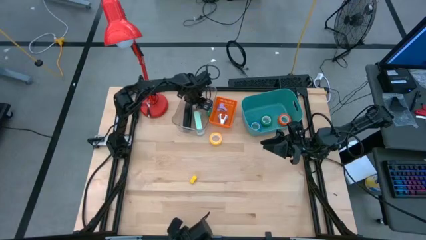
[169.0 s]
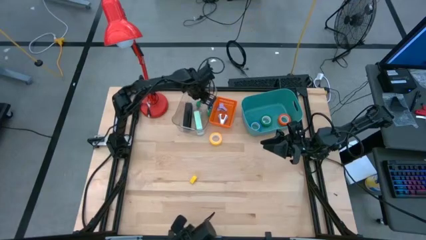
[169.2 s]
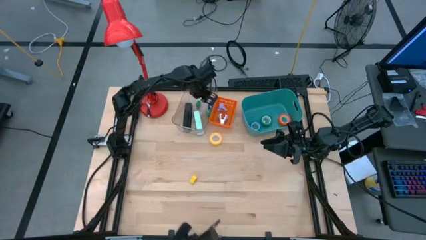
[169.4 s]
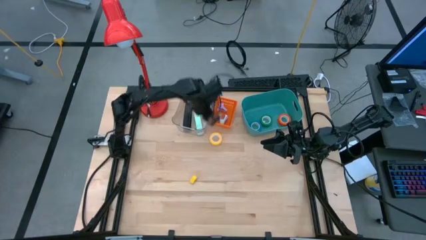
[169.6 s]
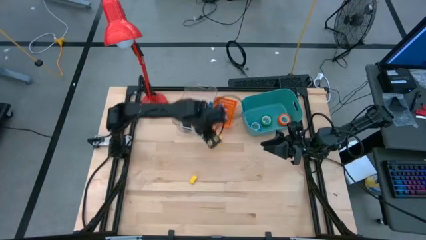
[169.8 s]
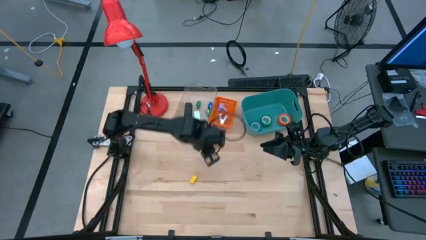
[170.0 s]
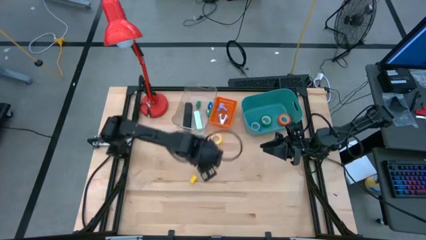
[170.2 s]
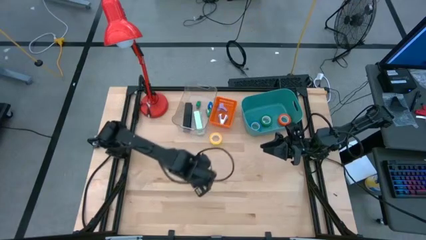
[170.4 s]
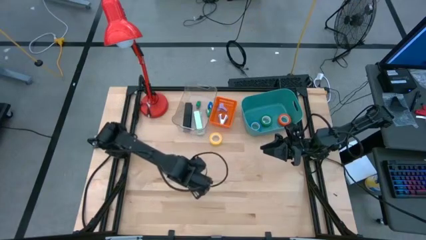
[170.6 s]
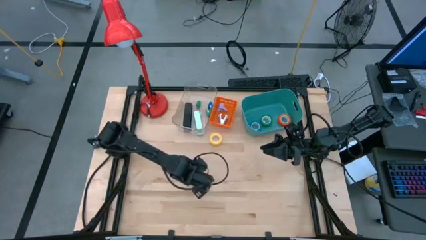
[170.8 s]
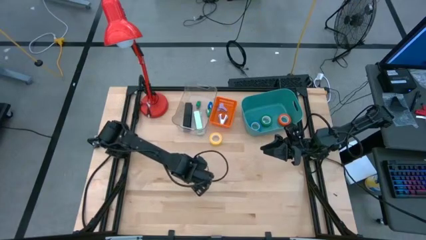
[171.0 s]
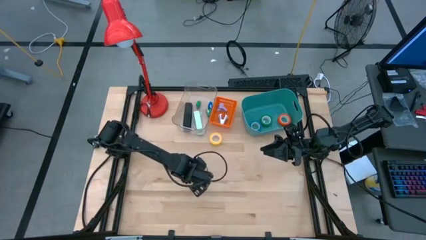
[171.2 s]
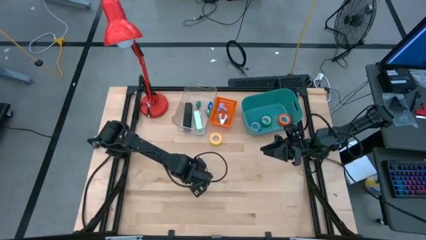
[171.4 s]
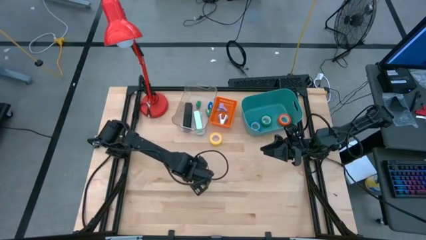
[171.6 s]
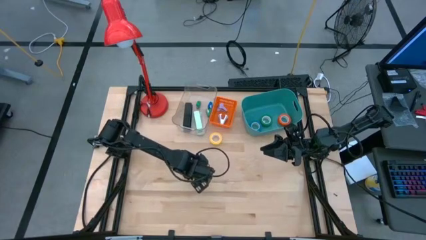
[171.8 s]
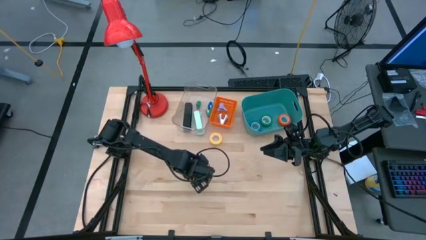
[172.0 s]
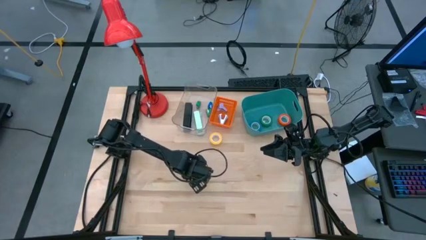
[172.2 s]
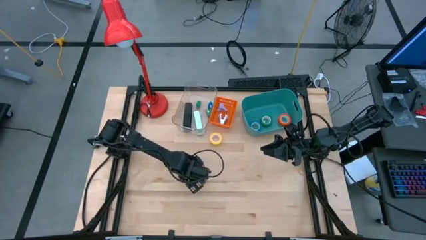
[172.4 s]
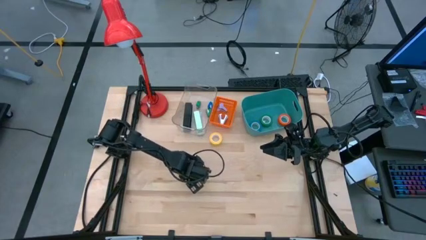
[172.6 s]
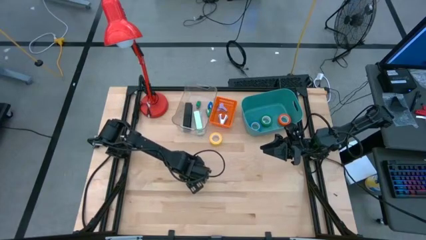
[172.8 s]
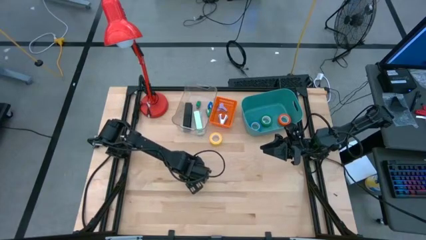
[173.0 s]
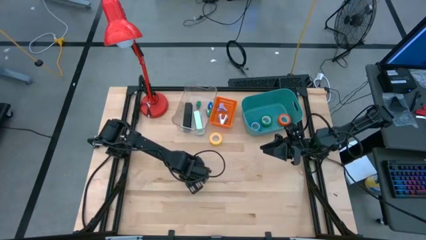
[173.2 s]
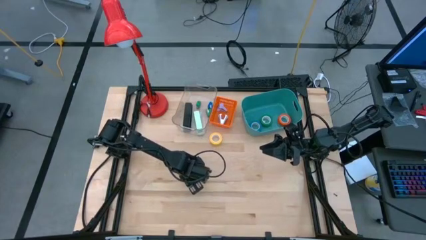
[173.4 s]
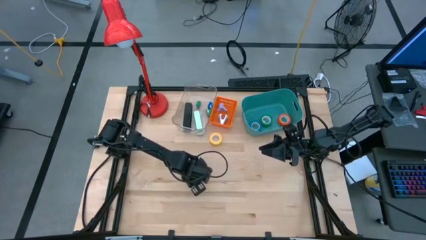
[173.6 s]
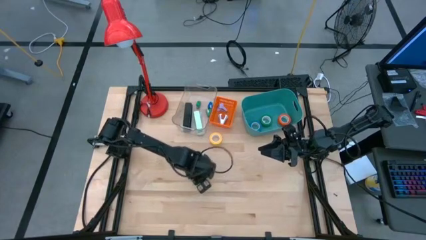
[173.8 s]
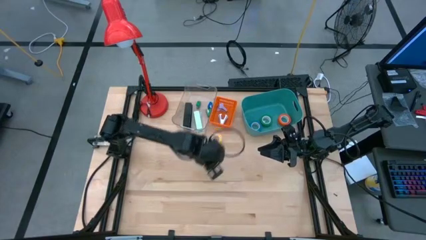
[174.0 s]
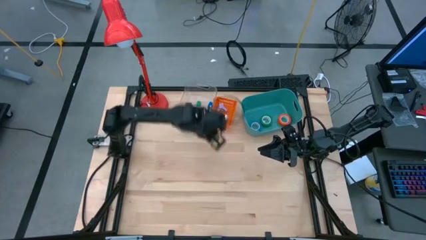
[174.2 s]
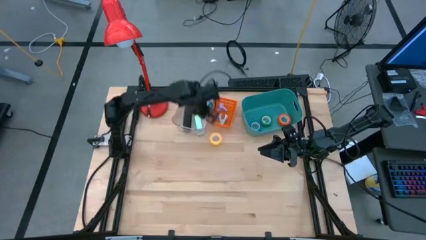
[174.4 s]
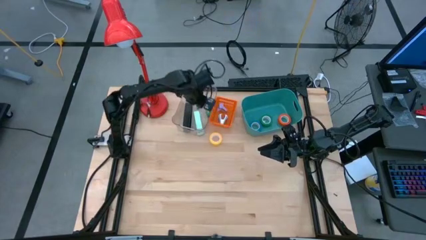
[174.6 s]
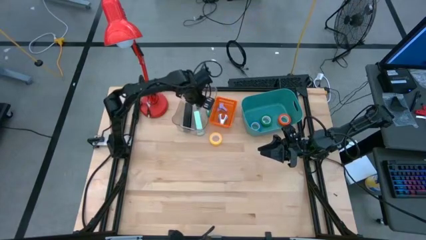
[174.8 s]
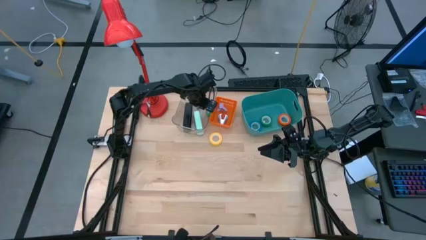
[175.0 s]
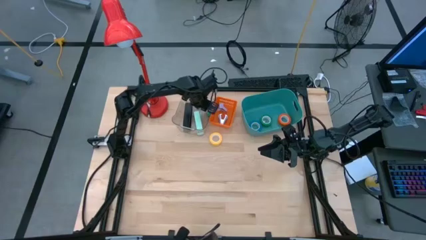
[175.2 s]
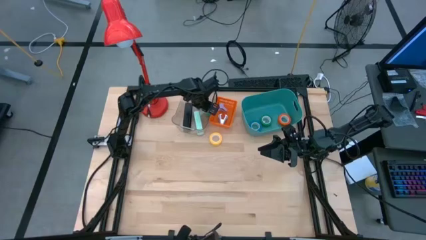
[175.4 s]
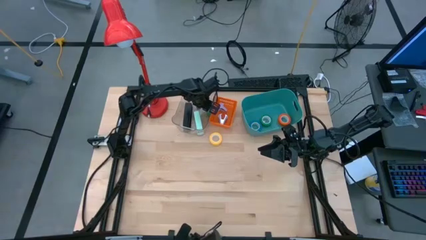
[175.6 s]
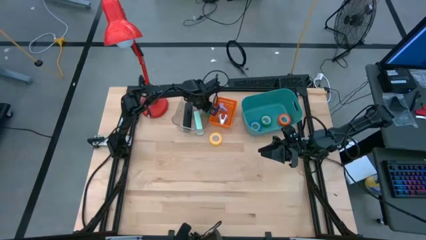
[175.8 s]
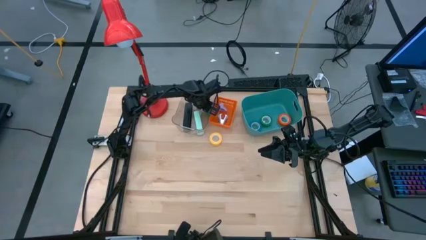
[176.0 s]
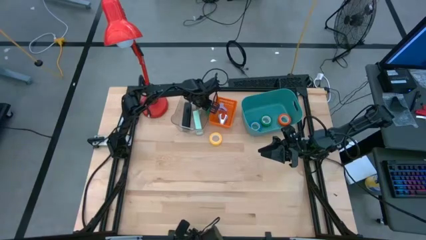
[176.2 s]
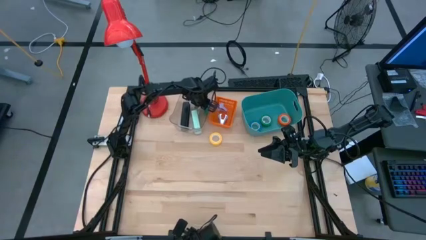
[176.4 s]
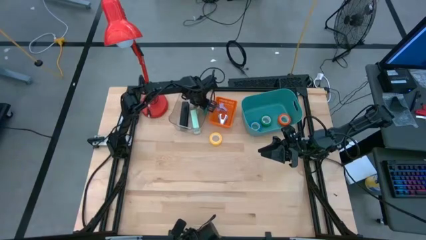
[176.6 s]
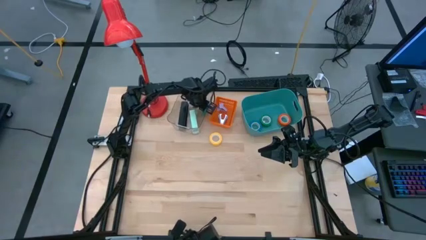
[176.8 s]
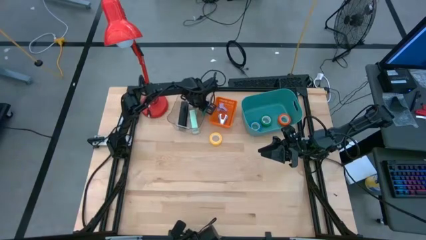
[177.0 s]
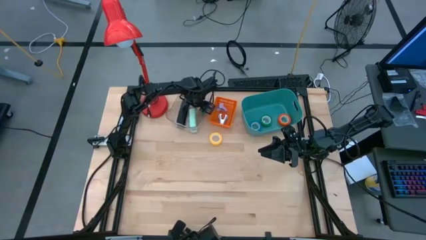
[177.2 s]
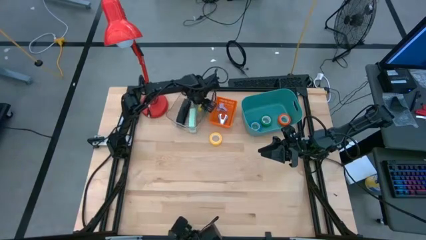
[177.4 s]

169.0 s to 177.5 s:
Task: Pick and place Stapler, Stapler remover, tape
Put the yellow stapler into the transparent bin

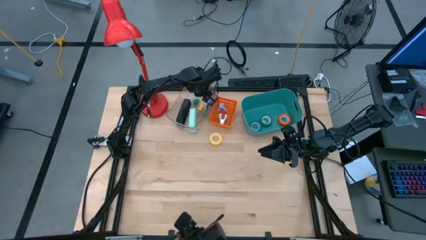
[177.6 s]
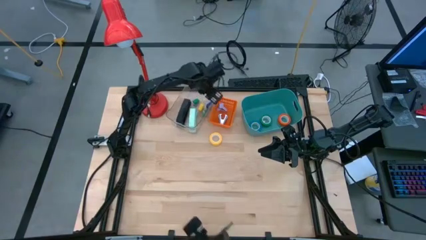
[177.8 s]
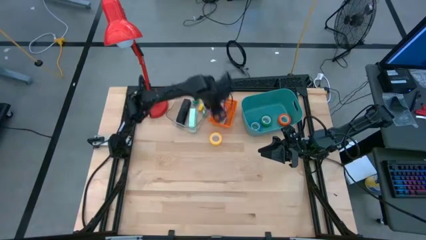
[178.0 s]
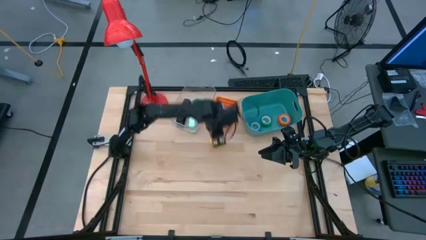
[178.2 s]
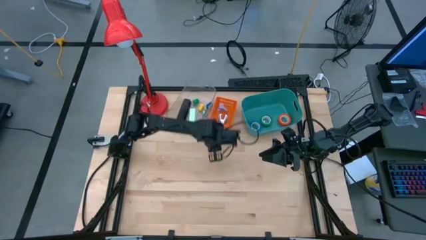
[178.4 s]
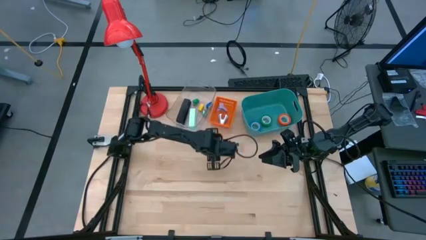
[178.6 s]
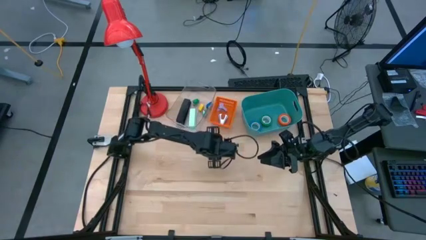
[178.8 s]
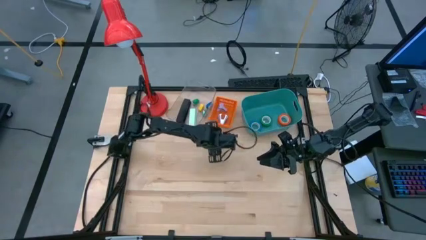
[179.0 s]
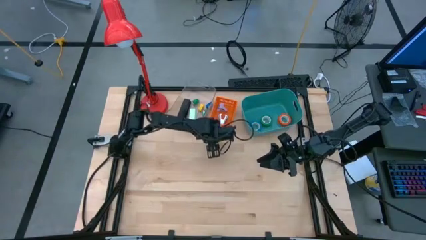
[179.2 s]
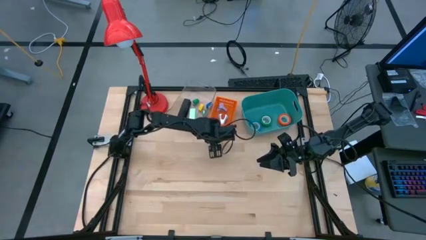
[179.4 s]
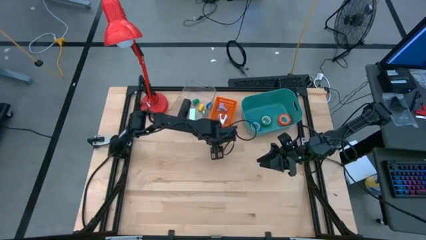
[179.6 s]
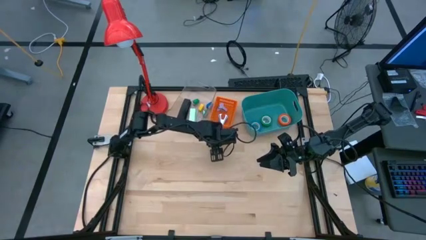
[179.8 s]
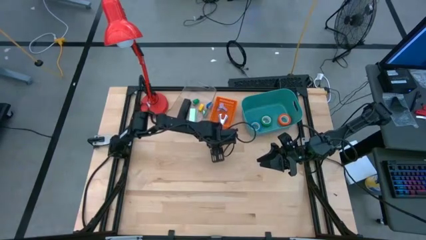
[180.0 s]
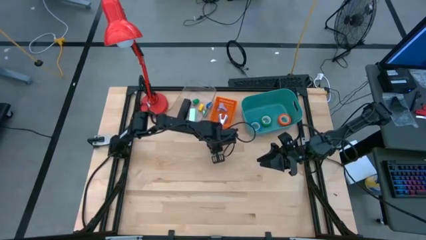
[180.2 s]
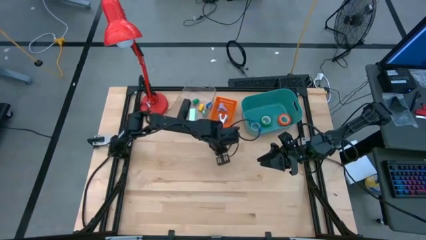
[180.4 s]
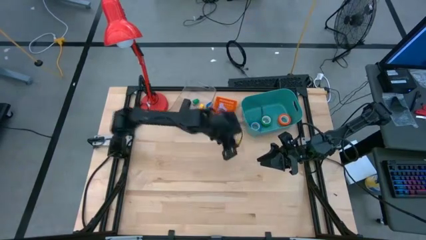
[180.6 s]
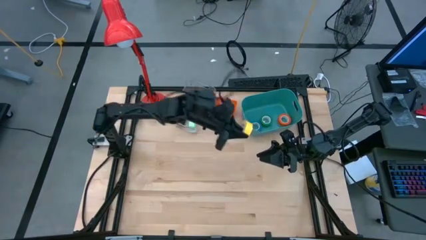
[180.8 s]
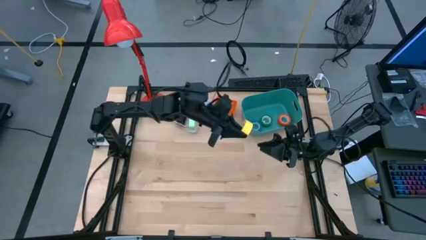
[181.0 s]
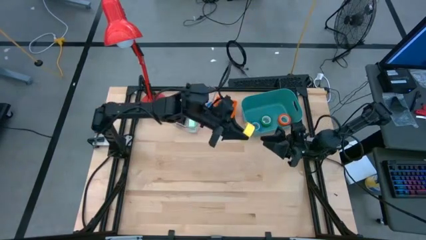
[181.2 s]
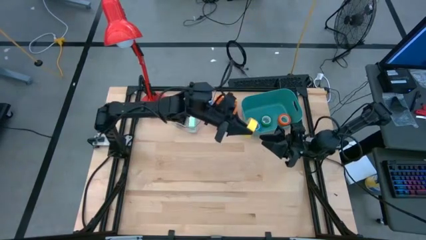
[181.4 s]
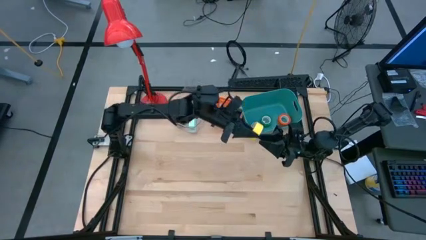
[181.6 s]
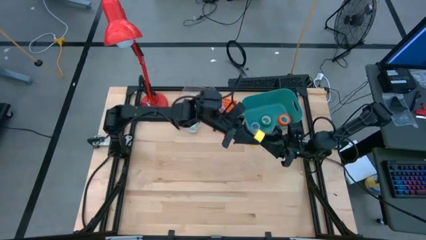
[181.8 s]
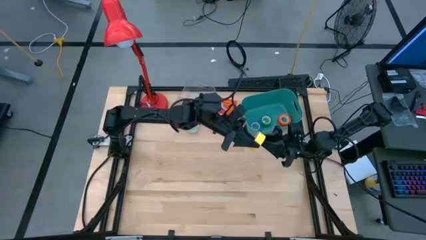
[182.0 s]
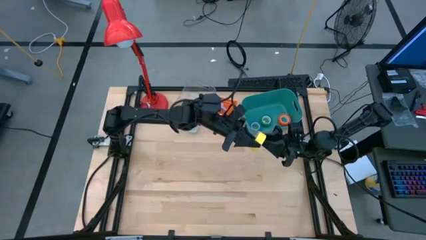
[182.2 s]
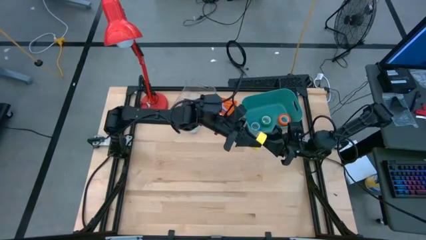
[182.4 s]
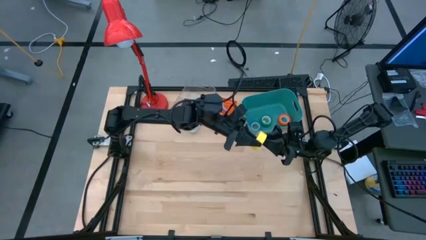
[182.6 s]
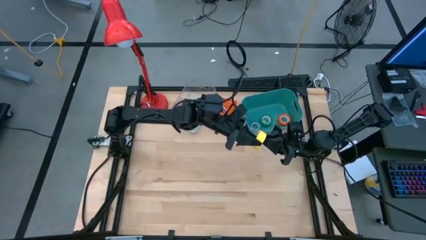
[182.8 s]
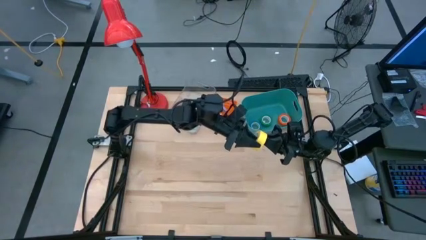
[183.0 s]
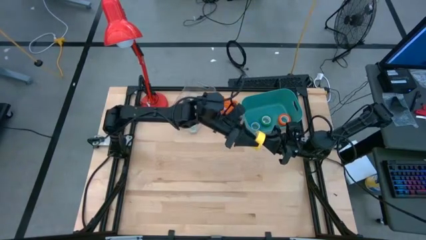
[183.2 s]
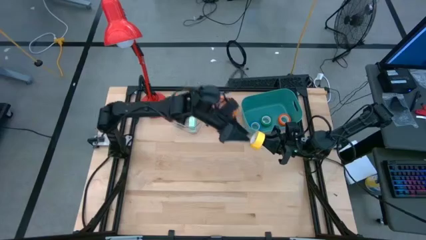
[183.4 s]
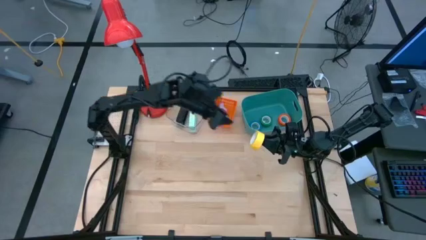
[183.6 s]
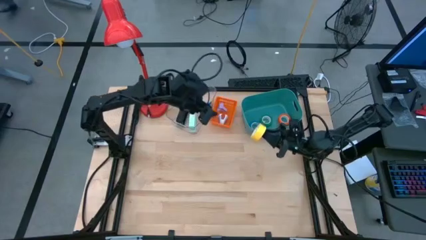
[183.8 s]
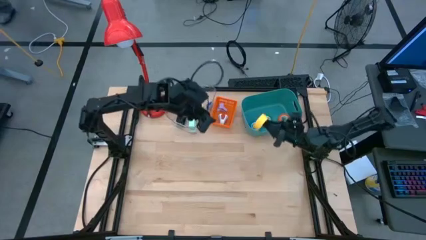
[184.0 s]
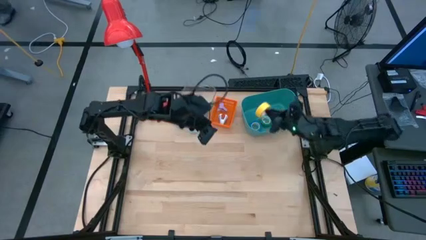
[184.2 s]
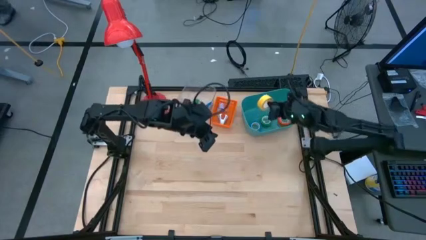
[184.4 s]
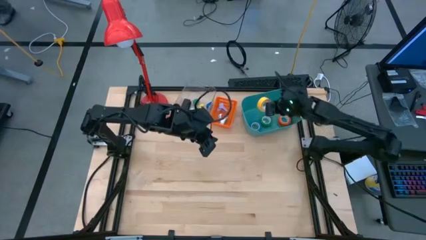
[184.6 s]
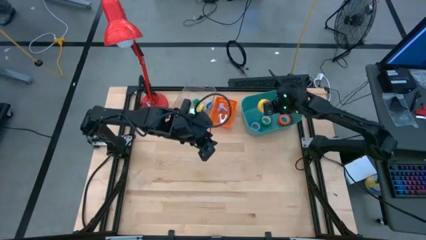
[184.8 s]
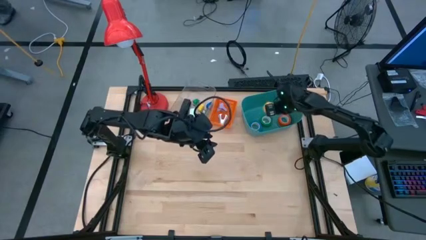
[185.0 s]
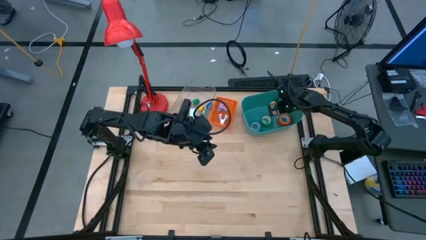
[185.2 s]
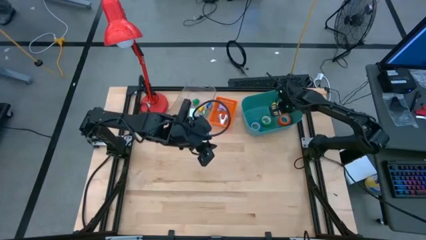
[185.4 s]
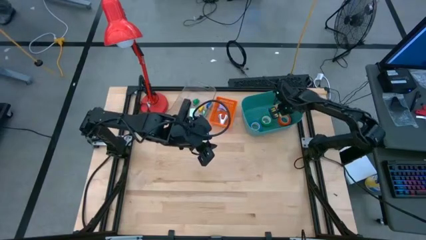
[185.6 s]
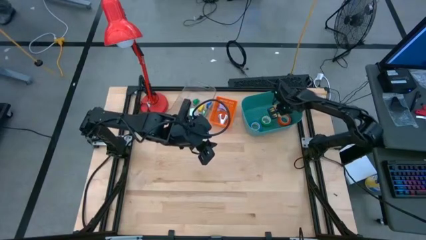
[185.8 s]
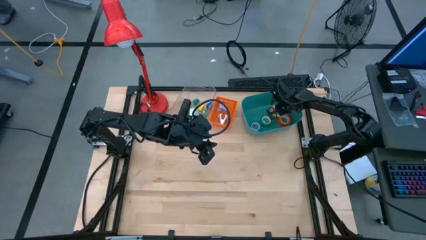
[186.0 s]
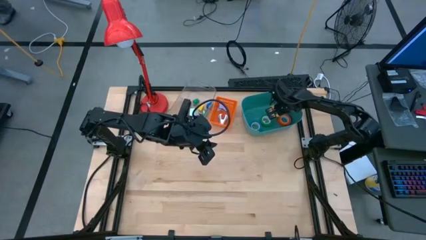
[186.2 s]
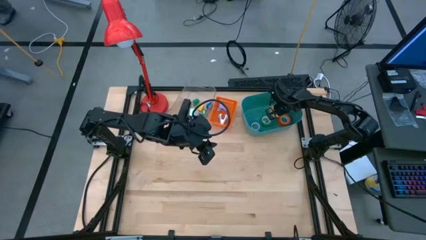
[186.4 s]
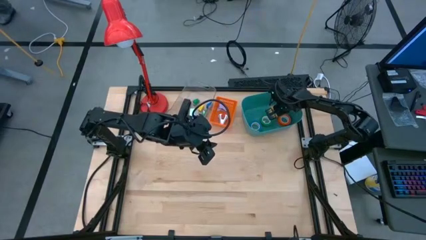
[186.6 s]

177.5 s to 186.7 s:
Put the yellow tape into the green bin
